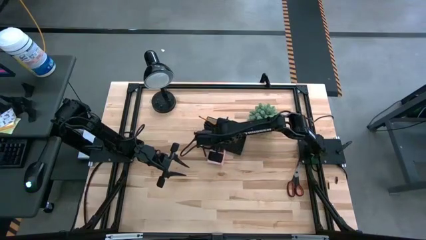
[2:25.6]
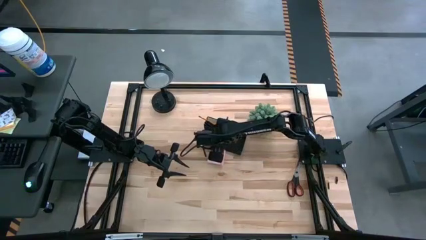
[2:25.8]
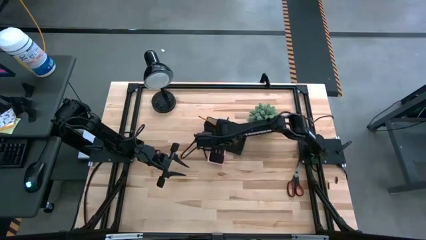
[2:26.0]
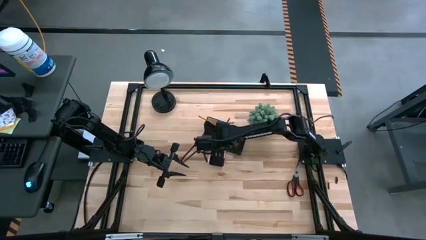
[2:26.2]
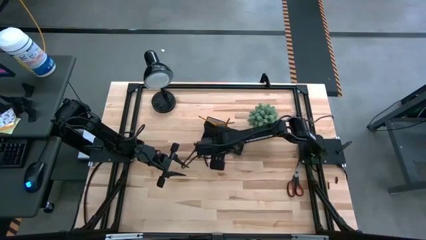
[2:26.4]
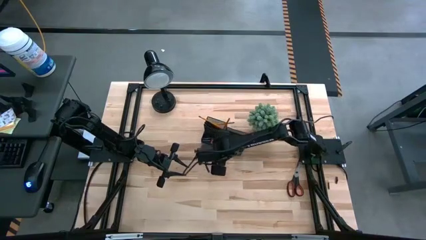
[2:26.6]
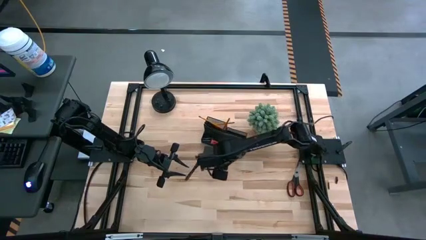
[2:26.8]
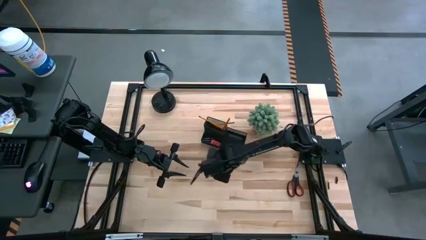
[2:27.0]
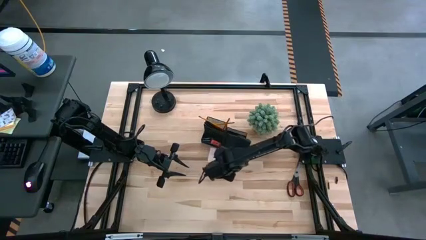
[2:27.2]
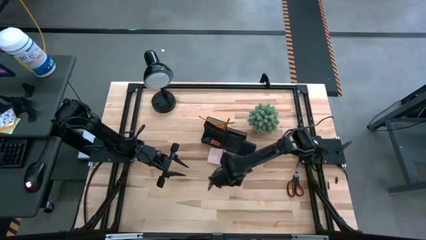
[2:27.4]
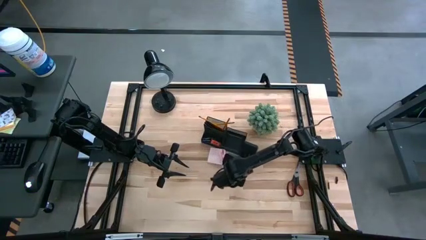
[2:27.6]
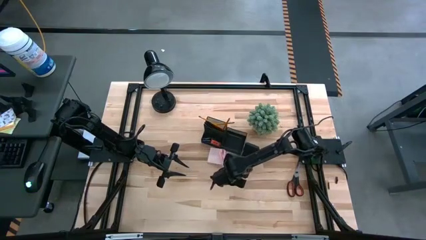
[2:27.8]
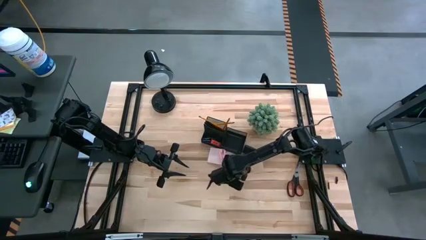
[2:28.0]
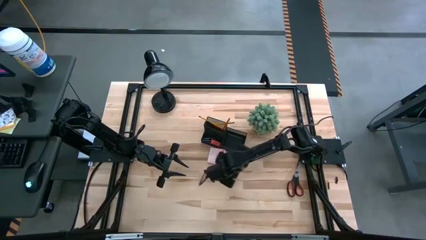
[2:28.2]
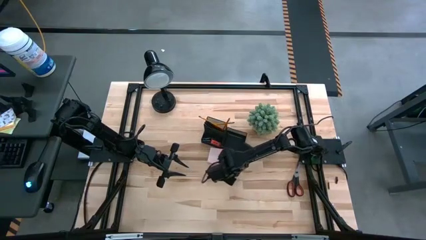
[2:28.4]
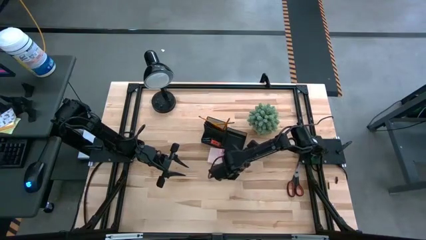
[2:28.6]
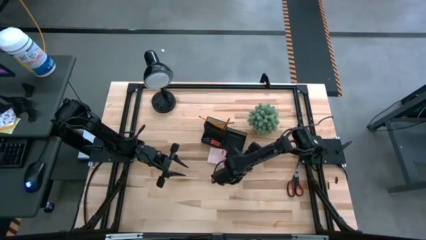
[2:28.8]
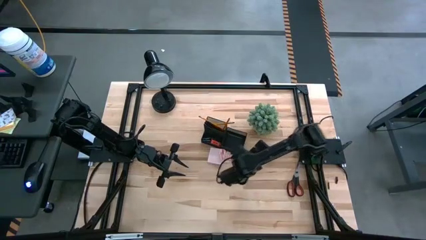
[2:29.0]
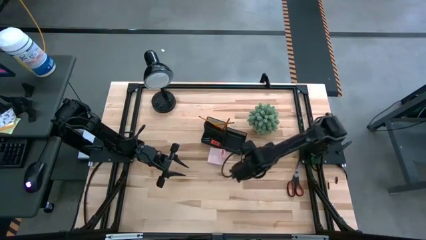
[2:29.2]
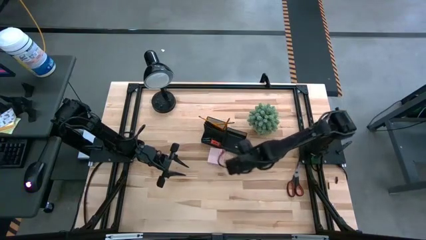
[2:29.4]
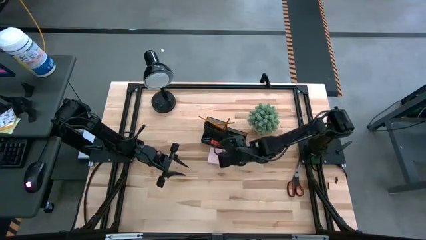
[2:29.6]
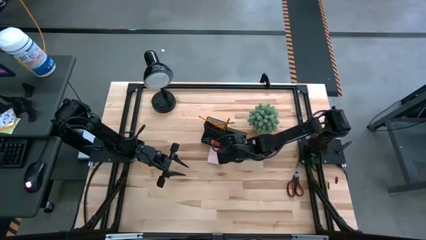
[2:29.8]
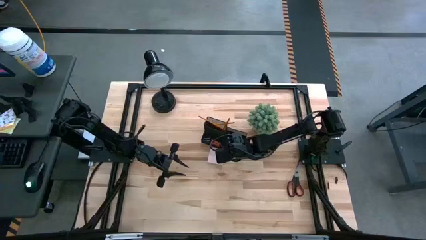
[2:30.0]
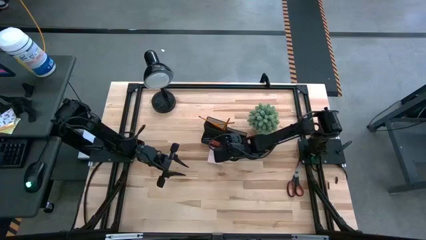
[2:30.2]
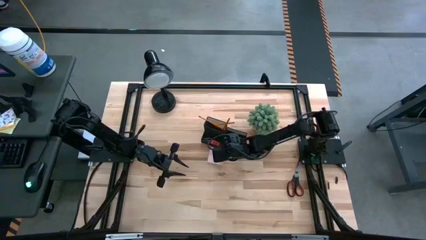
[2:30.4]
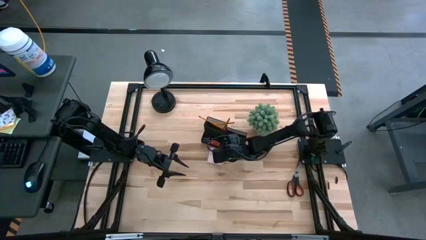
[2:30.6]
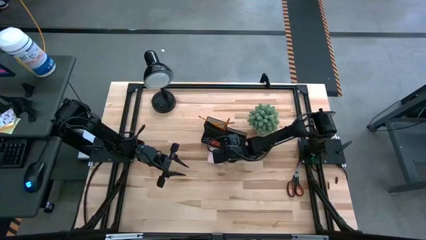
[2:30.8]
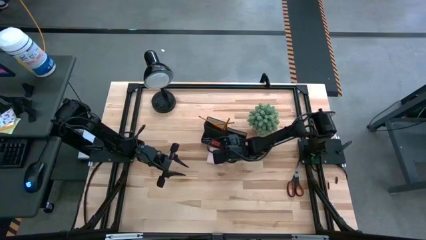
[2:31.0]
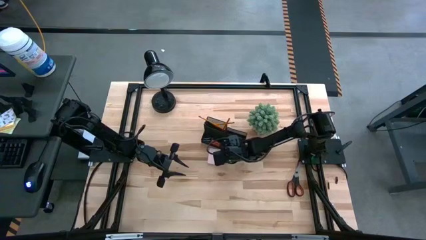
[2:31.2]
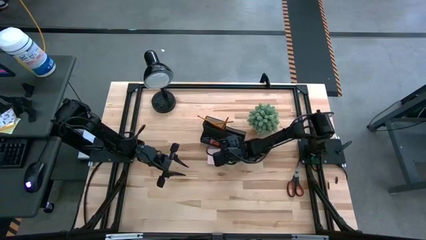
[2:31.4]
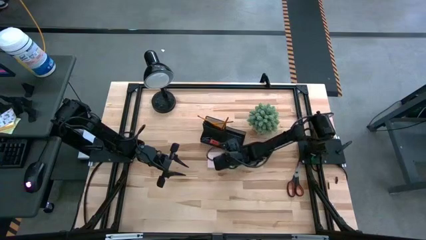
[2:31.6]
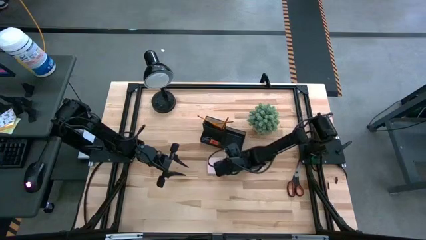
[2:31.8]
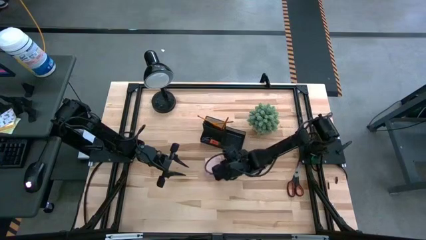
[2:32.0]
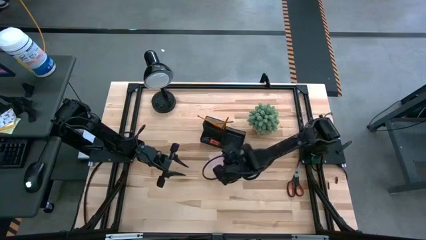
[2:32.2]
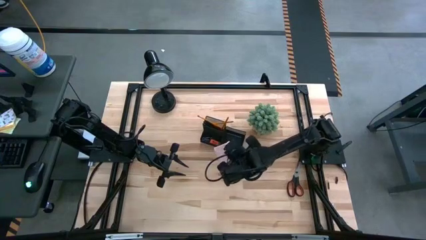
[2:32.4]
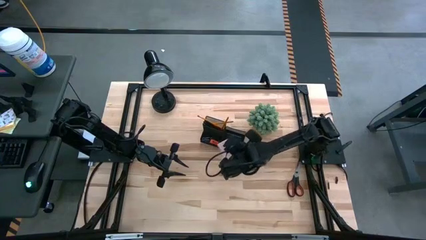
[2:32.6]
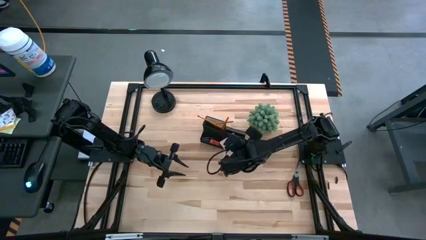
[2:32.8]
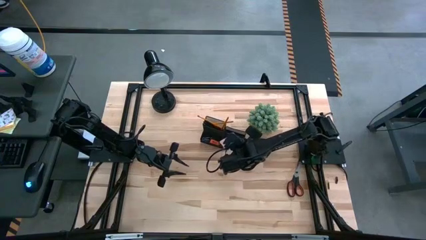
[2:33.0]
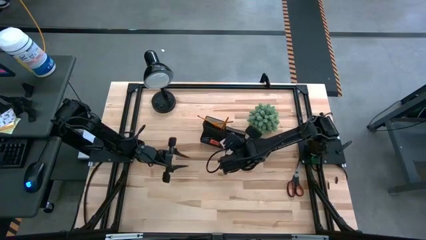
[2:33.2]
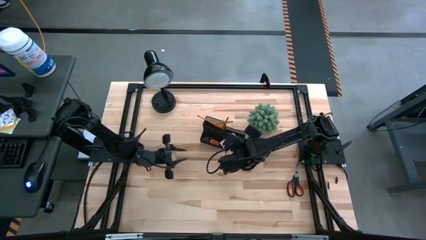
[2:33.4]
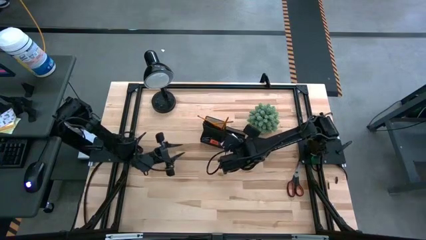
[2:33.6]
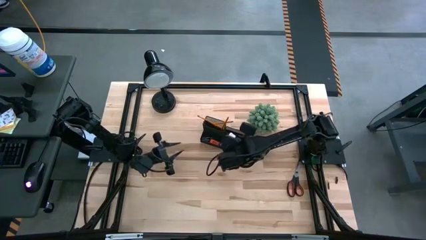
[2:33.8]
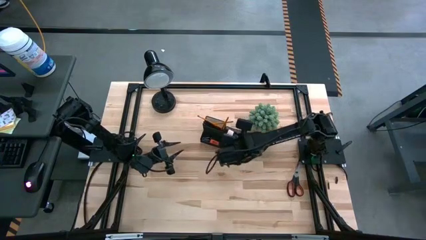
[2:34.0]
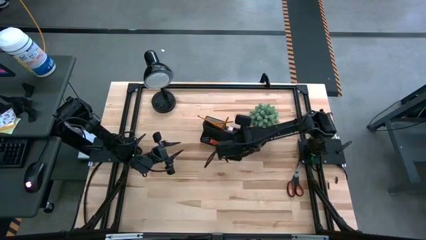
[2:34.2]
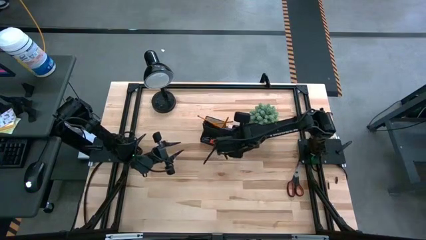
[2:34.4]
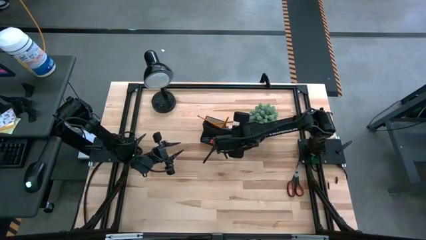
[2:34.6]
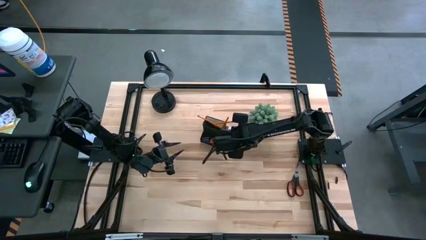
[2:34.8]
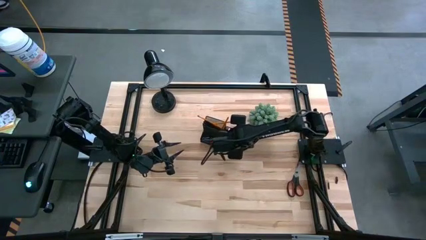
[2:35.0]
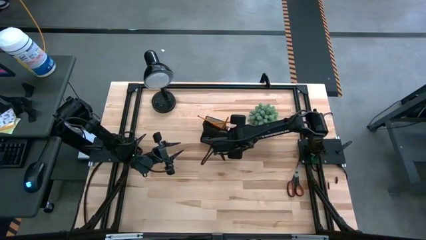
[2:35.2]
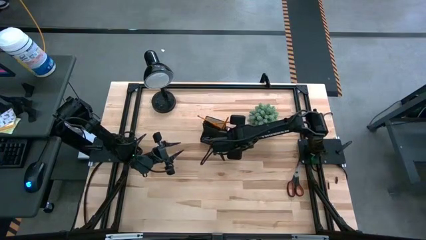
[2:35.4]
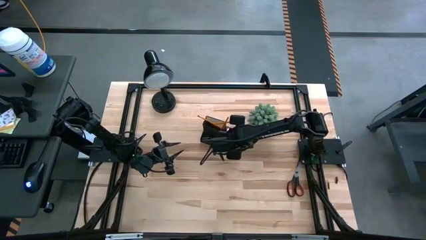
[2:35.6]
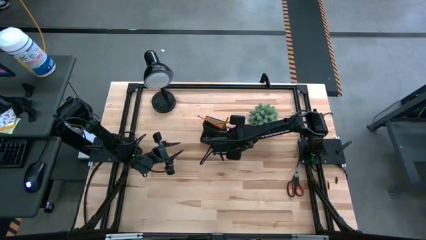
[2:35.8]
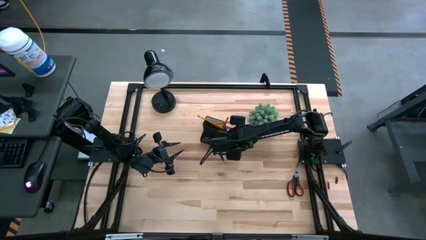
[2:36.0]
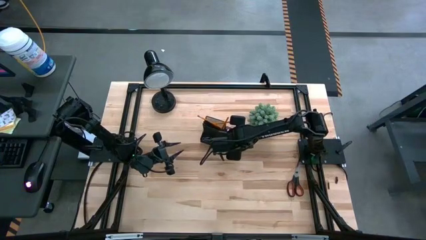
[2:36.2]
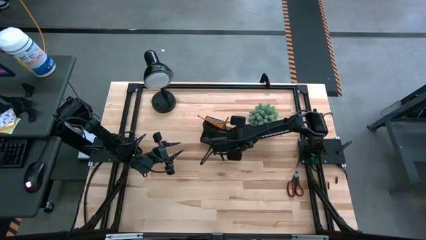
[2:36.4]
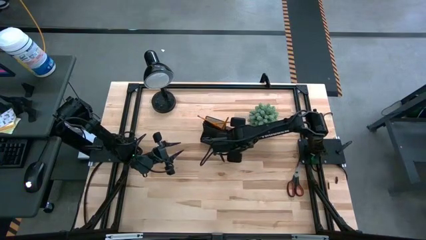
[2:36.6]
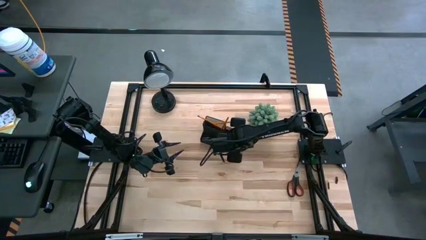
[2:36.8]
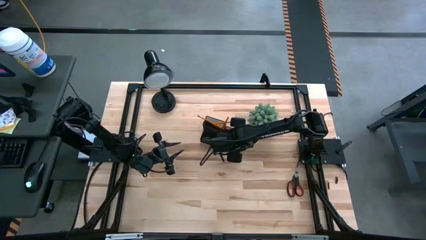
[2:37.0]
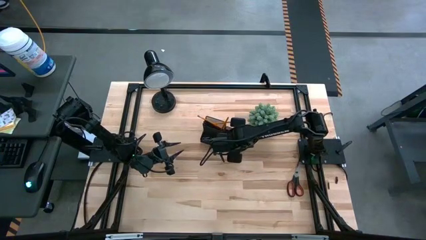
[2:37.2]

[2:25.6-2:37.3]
Task: Pick and place office supplies into organizer
Put the pink sticky notes into the black desk organizer

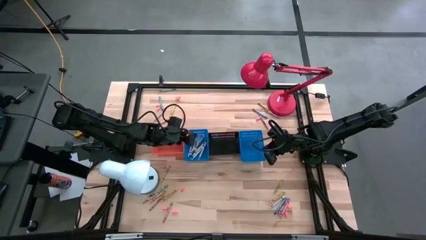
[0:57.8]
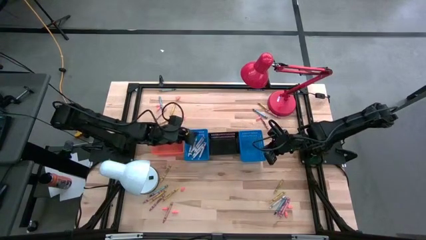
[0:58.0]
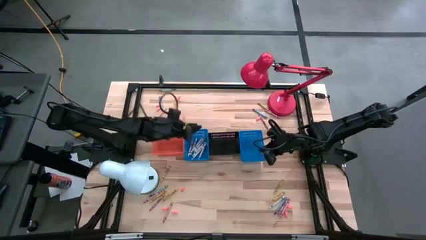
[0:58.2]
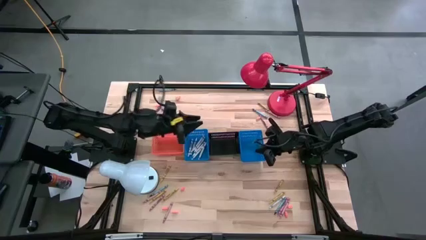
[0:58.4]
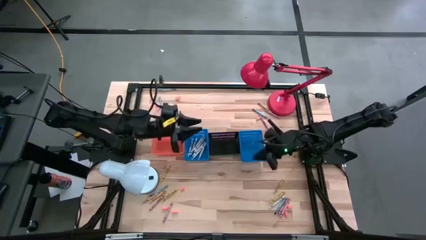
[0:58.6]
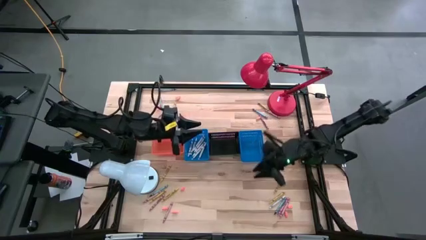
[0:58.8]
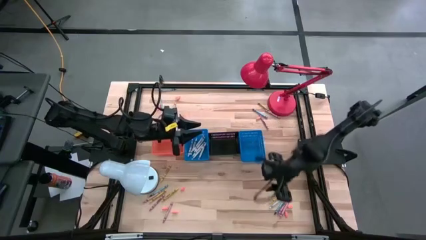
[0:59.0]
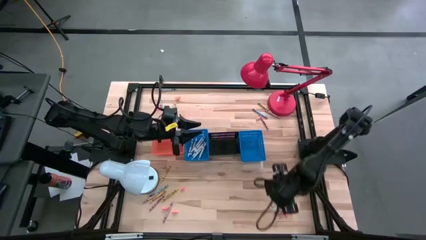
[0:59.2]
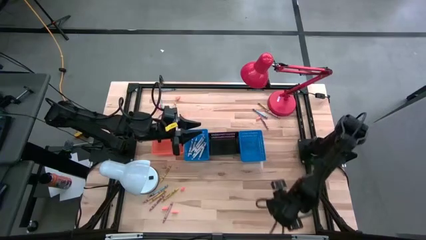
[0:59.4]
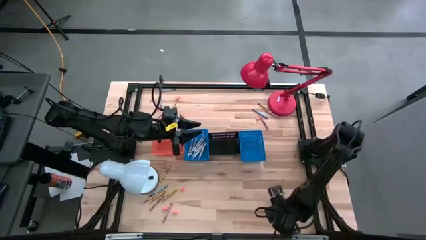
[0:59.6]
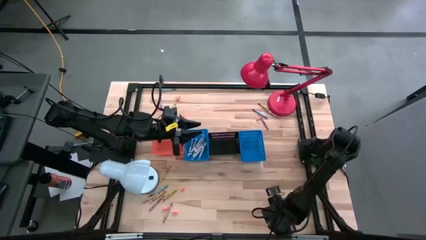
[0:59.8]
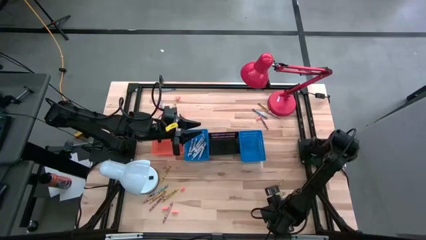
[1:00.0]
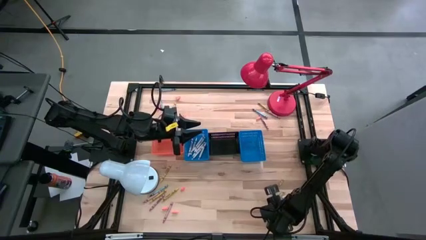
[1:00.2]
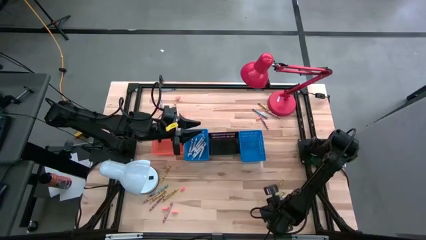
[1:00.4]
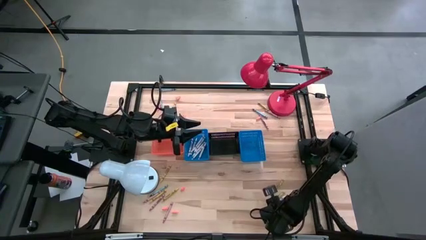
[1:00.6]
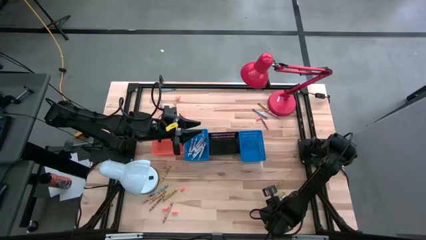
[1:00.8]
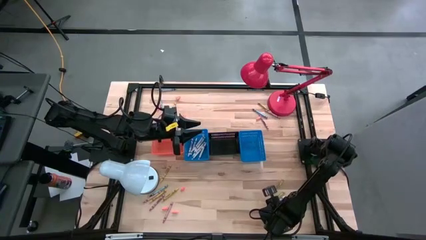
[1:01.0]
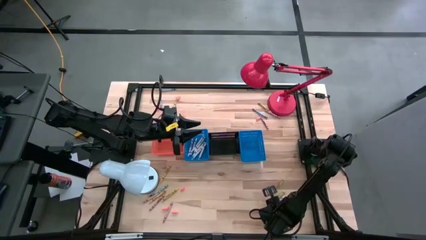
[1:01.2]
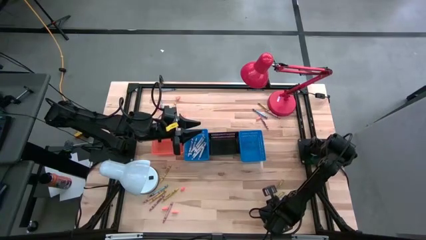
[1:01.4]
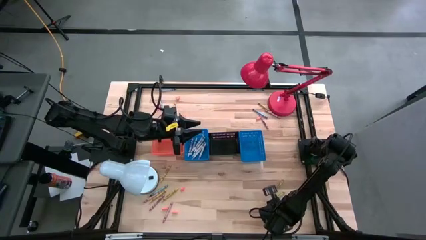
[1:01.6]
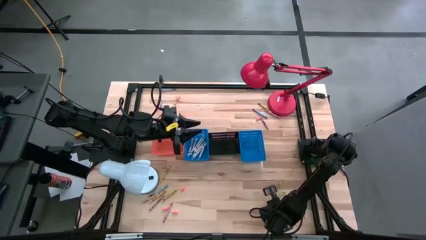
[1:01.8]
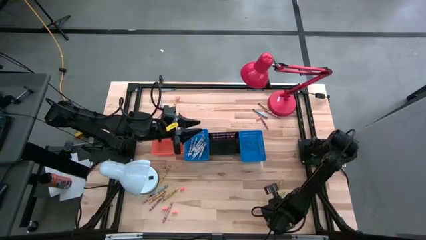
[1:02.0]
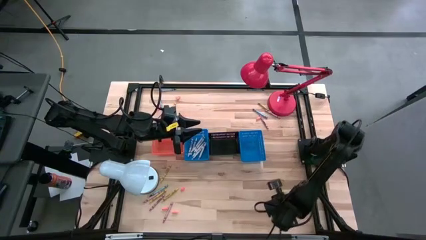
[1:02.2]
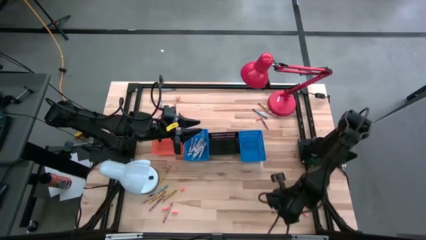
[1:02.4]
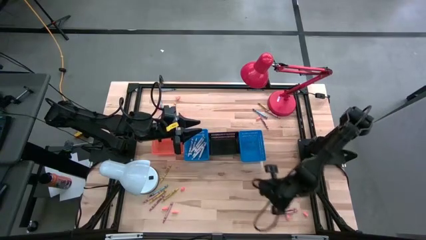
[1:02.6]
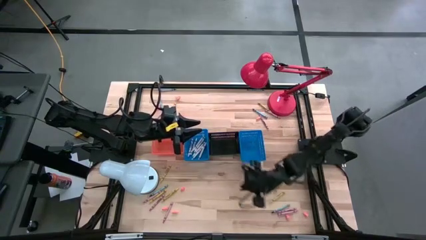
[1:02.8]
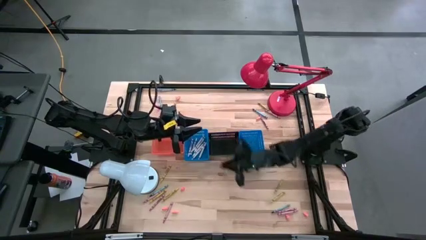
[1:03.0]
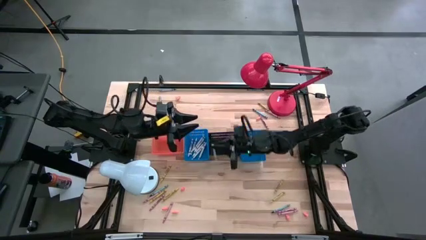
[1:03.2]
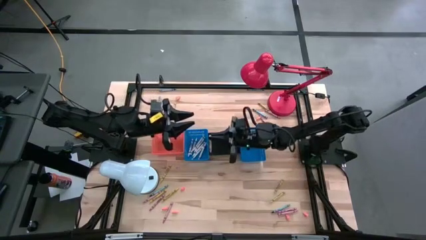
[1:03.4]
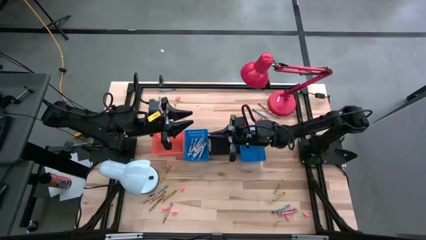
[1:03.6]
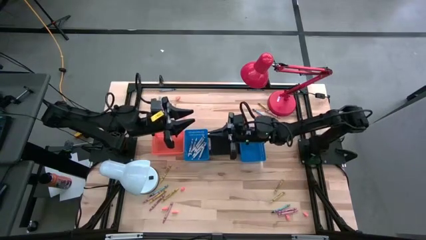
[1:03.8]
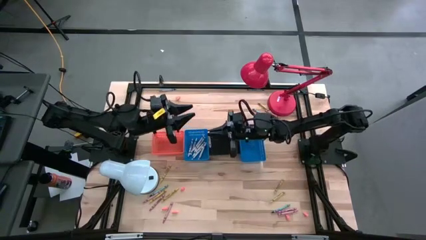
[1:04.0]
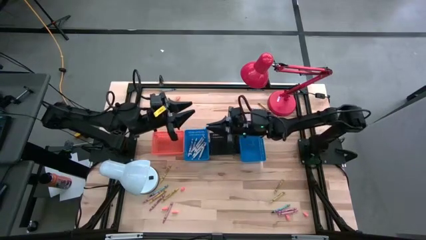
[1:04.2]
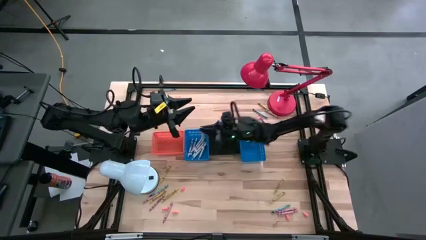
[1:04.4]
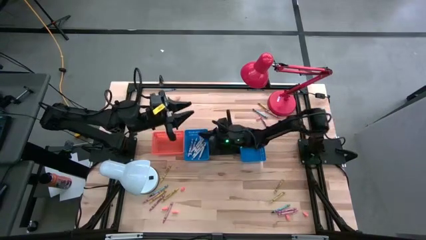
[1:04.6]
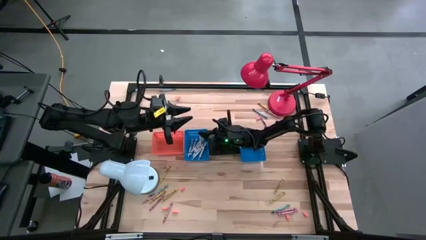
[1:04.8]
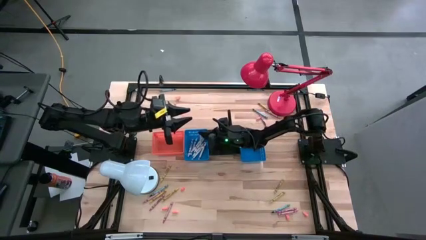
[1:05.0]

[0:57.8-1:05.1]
Task: Sort crayons
Put the white crayon into the left blue bin
